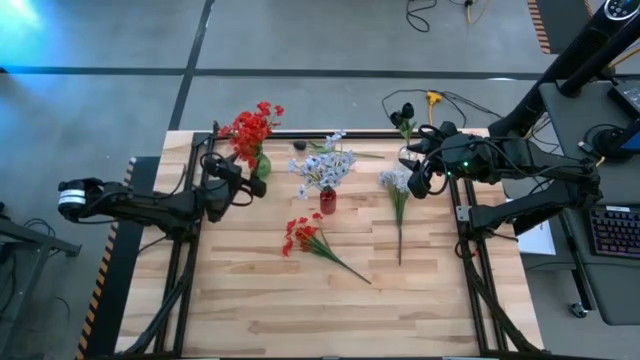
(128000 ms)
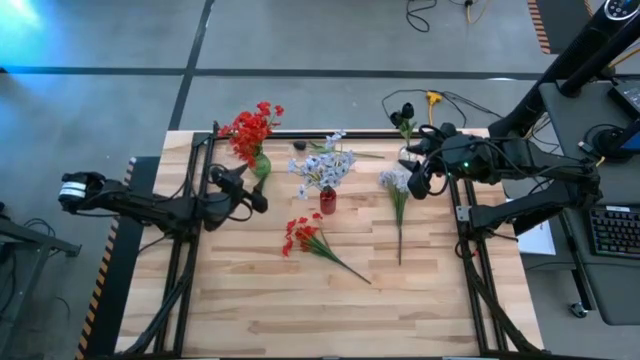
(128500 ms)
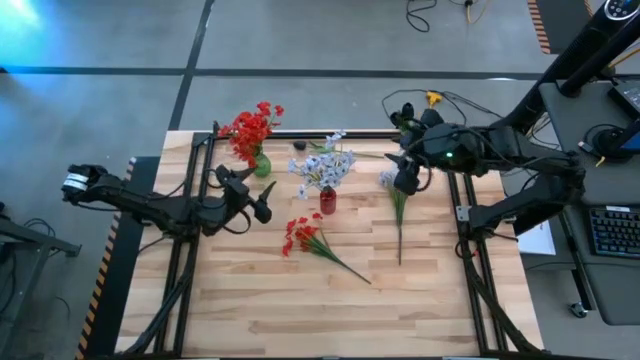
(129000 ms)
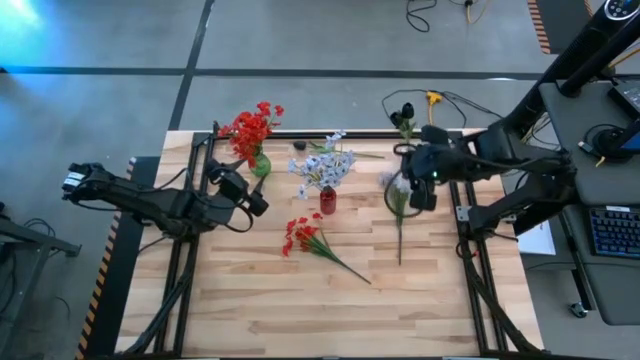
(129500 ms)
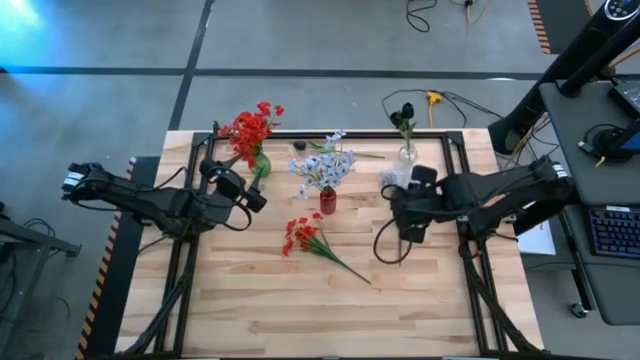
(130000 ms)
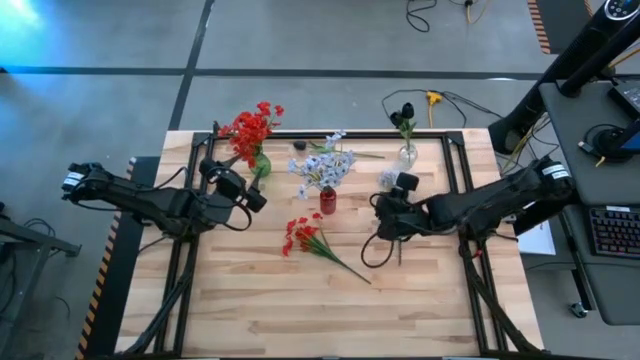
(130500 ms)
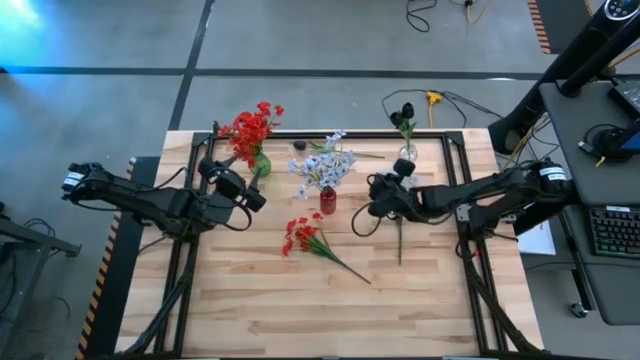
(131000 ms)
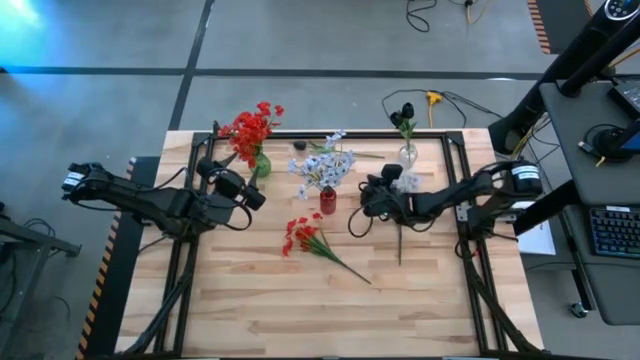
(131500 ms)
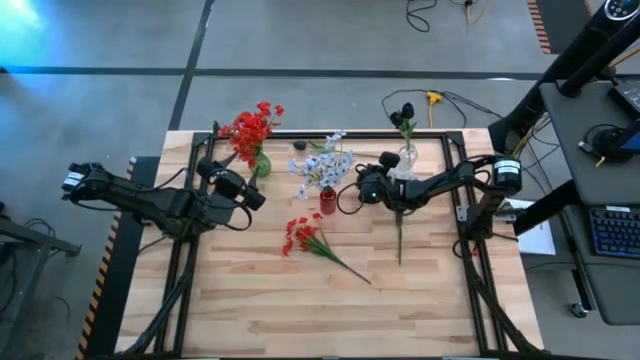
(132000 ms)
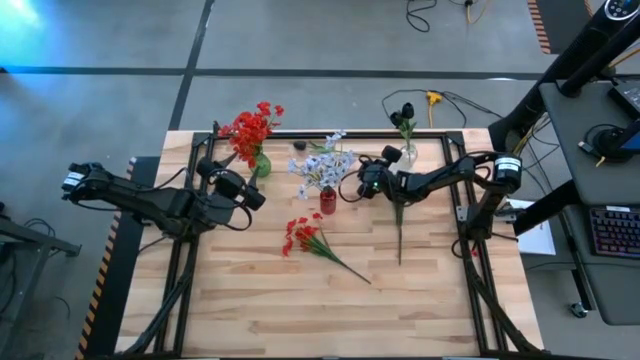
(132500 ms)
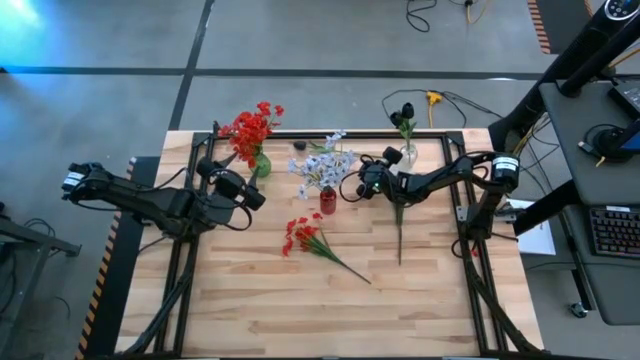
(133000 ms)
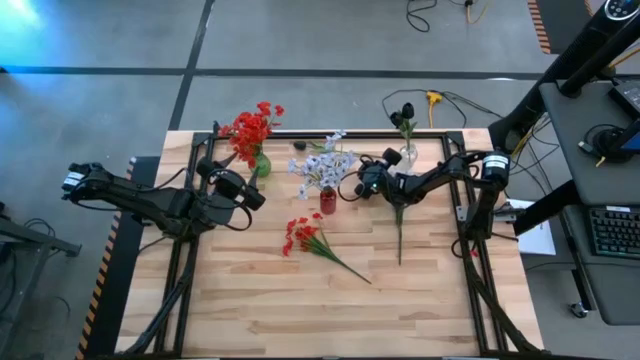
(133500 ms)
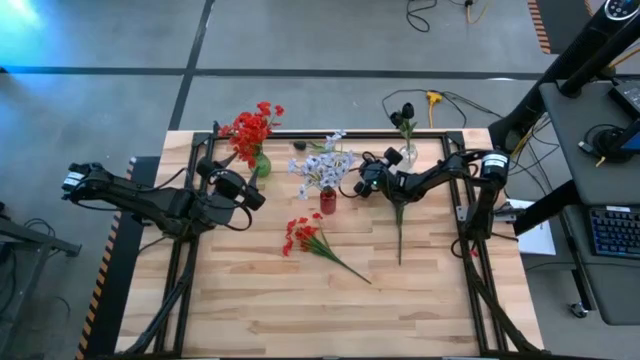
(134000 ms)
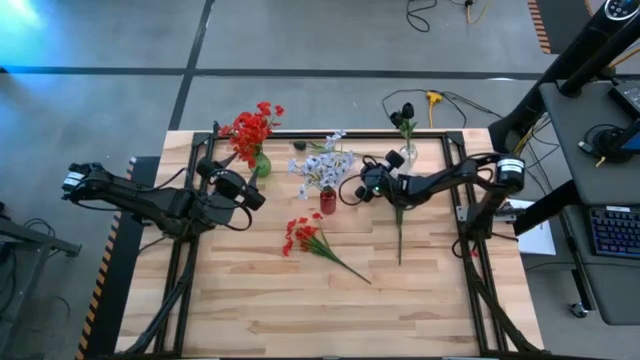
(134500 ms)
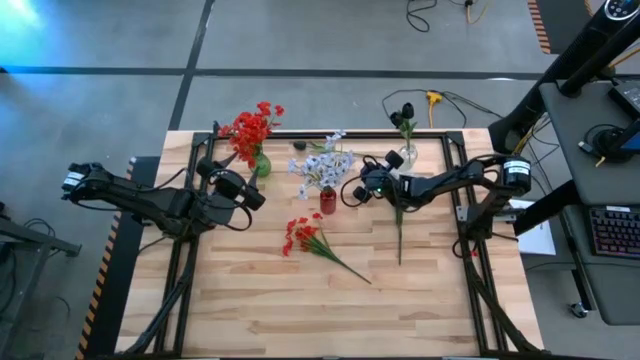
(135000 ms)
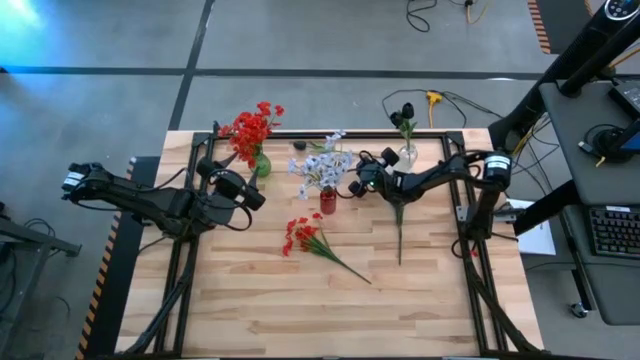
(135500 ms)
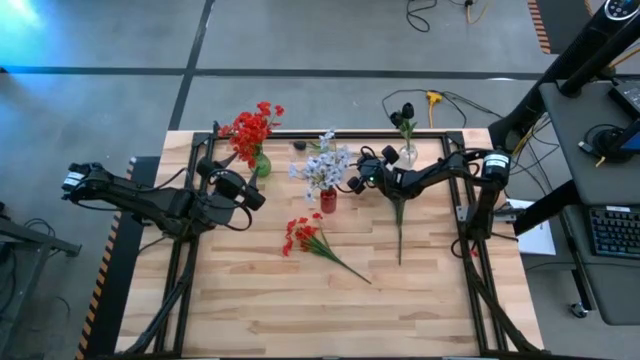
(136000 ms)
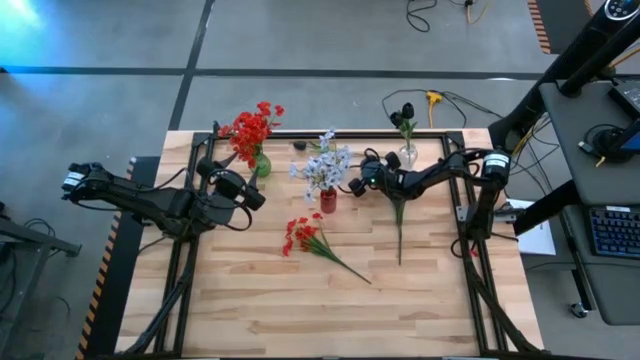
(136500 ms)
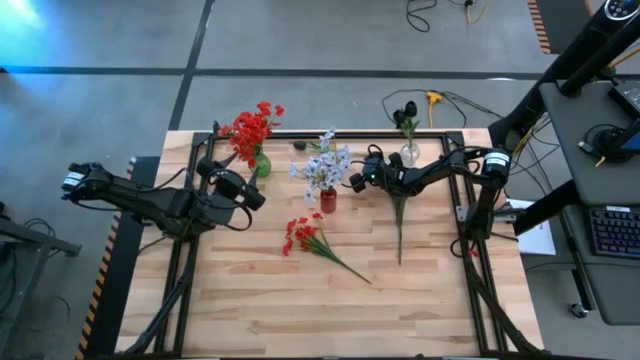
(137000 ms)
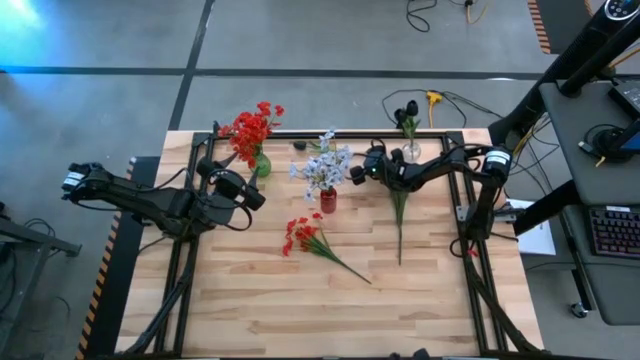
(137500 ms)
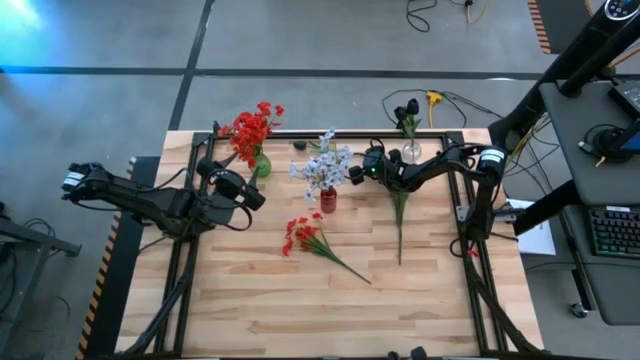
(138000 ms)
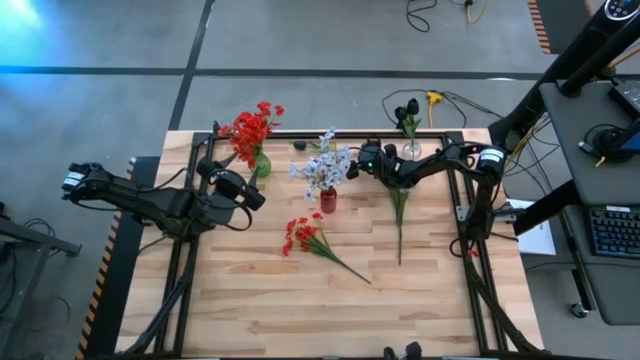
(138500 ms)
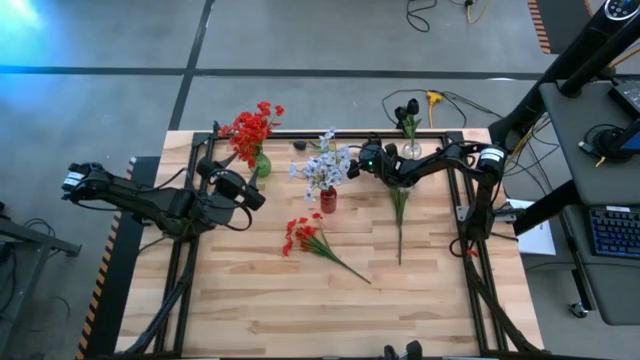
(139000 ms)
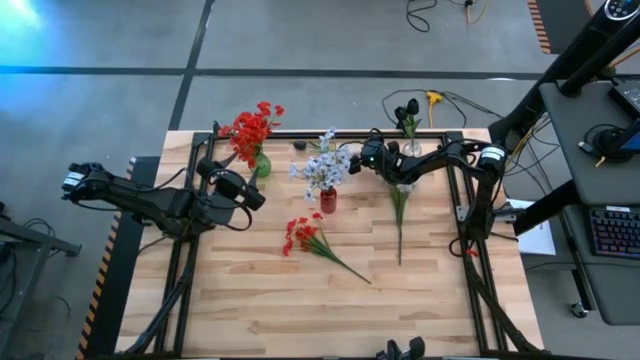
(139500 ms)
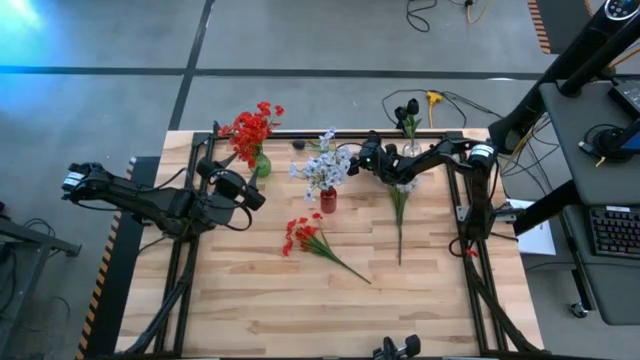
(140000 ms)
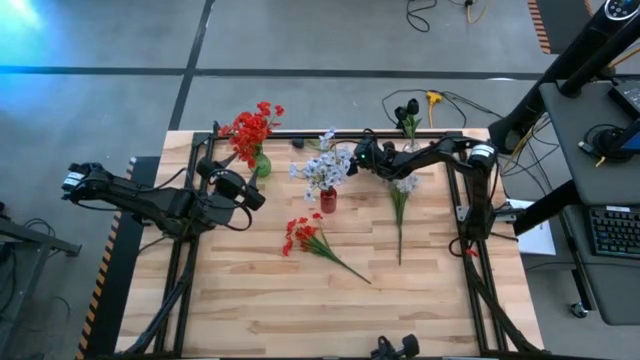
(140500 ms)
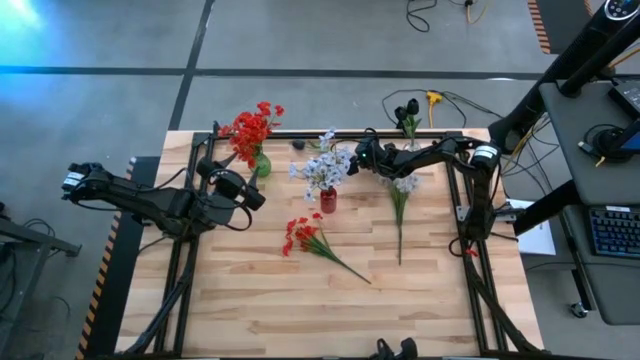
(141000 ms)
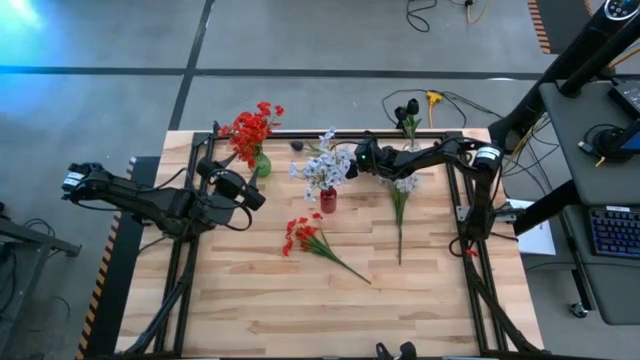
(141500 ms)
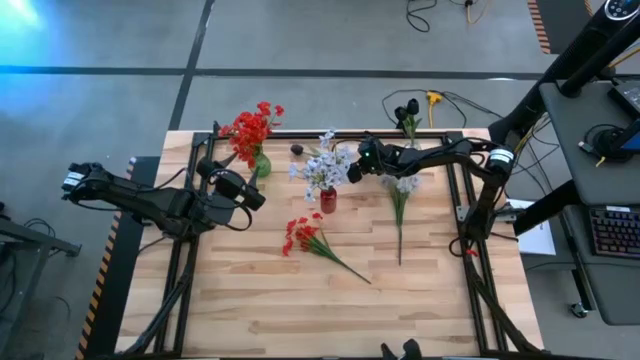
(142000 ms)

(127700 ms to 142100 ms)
Task: Sort flowers into vase by color
Put the black flower into the transparent vase

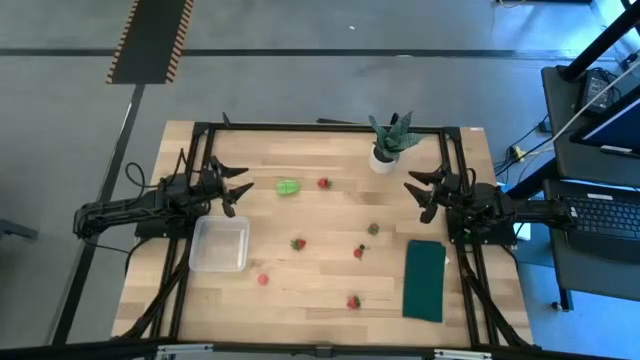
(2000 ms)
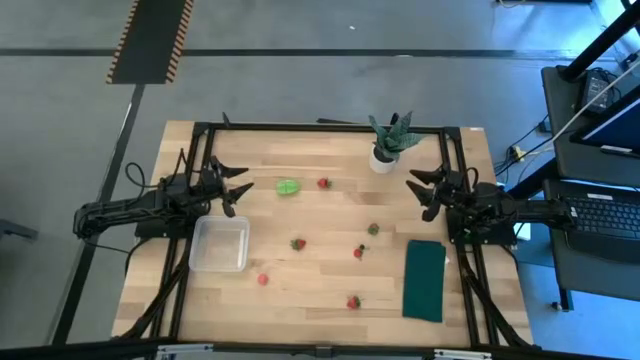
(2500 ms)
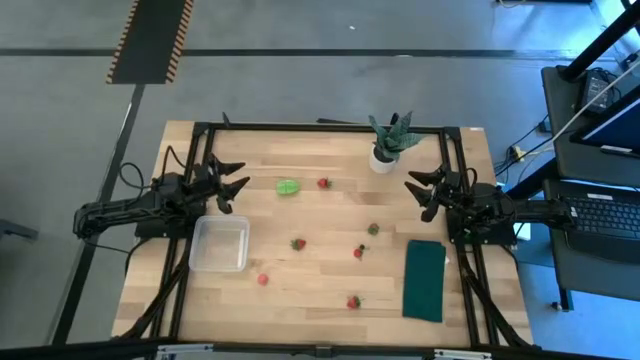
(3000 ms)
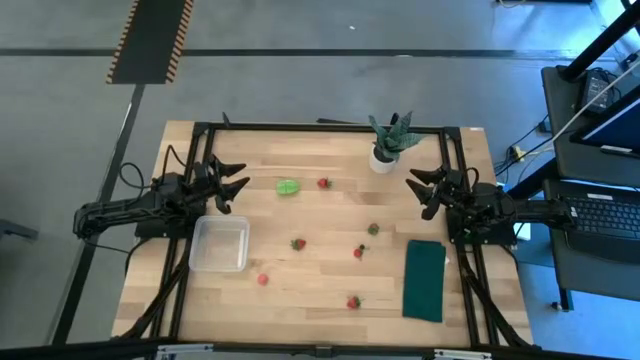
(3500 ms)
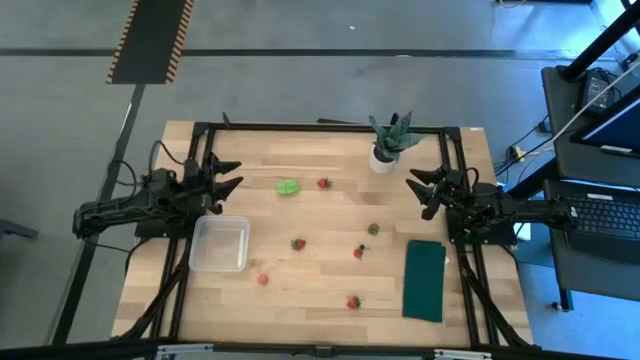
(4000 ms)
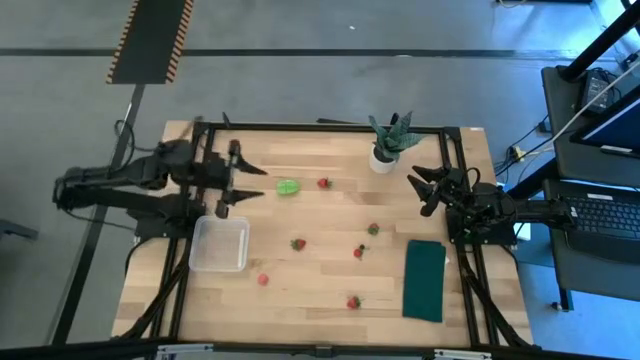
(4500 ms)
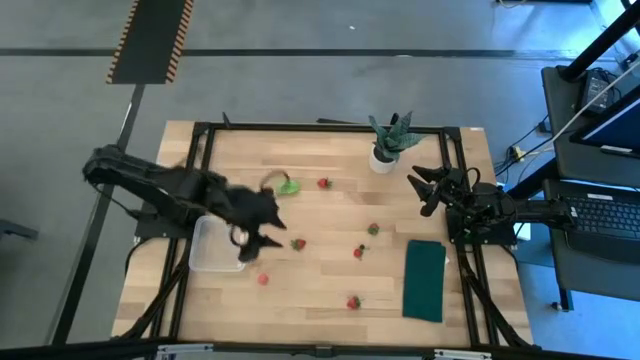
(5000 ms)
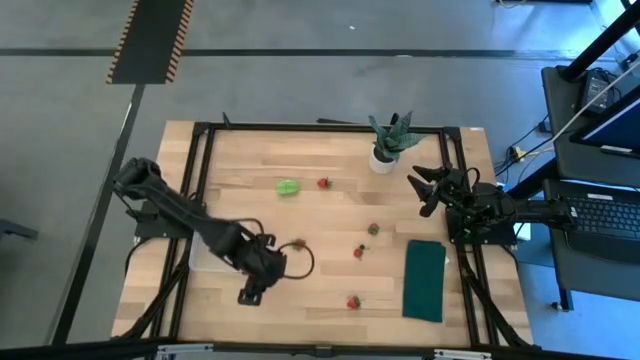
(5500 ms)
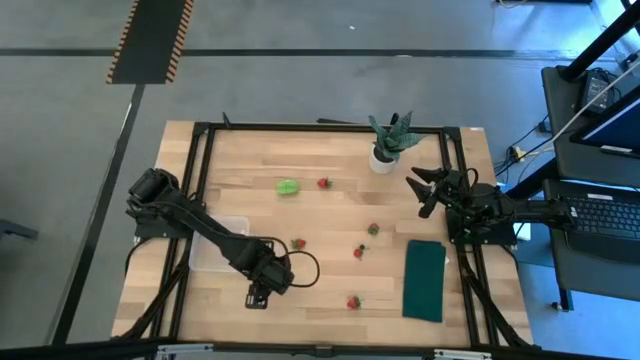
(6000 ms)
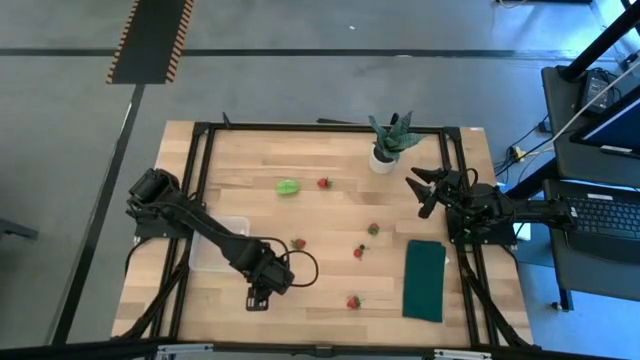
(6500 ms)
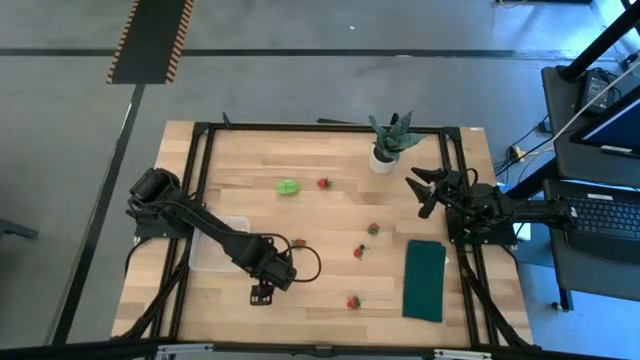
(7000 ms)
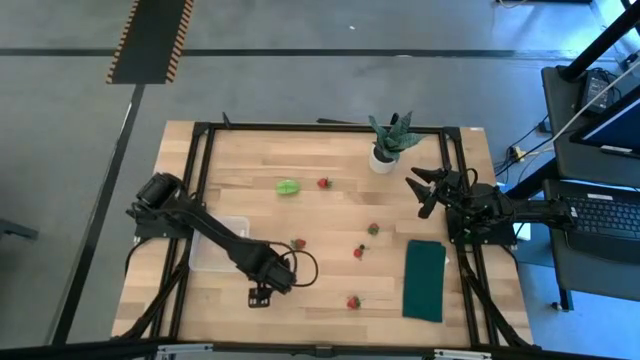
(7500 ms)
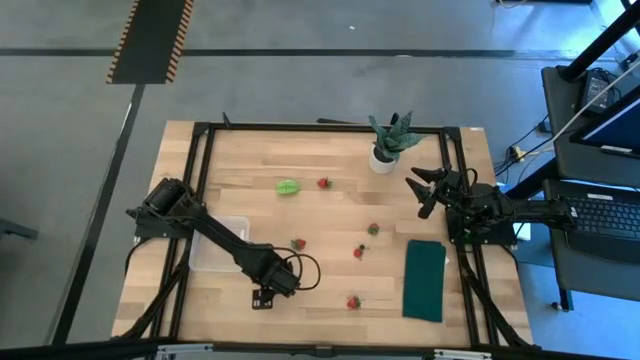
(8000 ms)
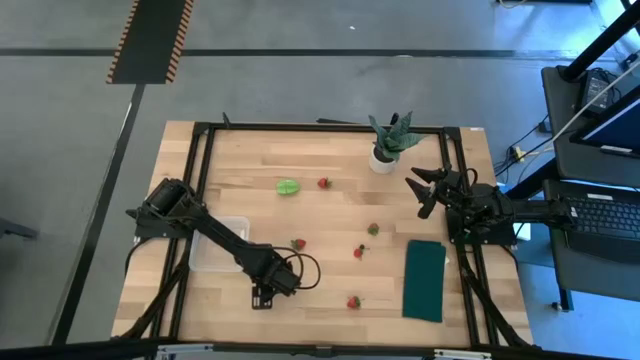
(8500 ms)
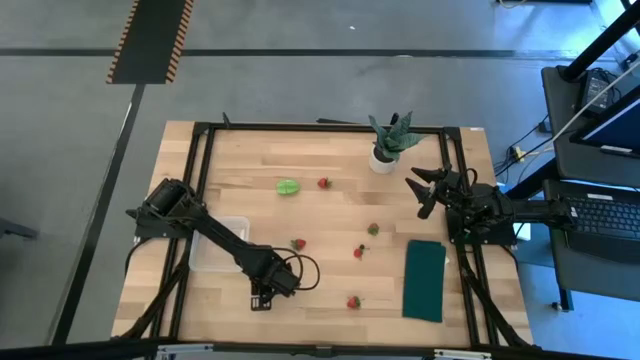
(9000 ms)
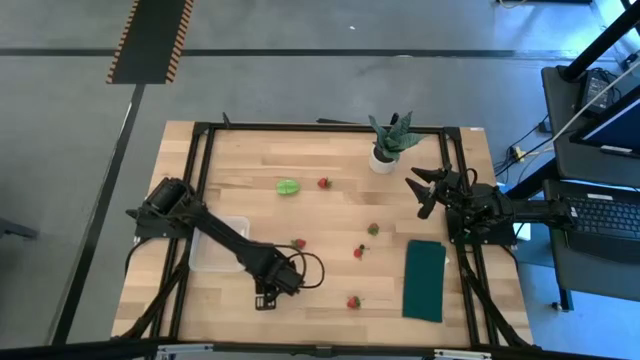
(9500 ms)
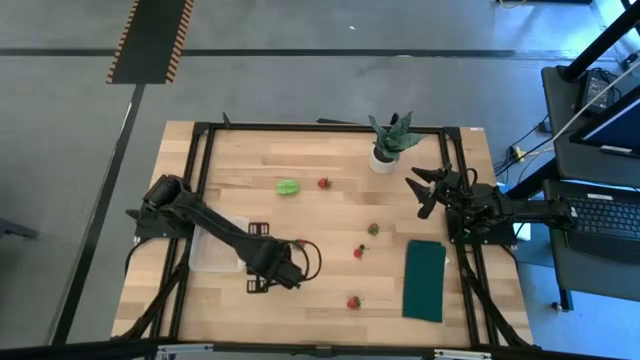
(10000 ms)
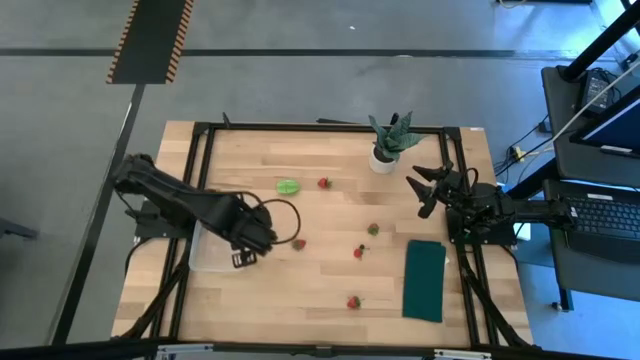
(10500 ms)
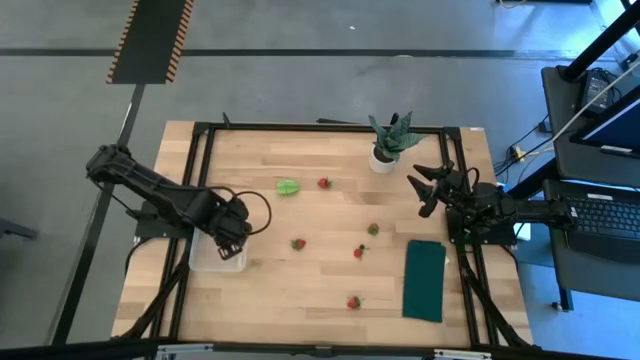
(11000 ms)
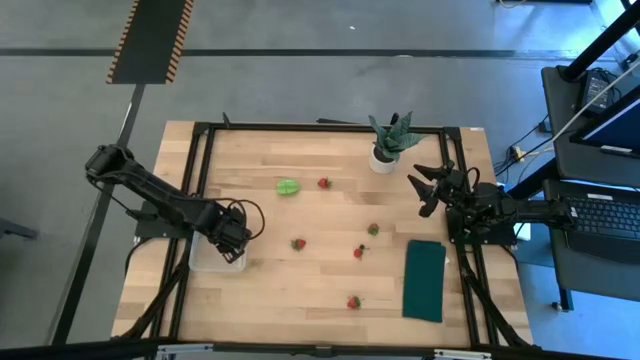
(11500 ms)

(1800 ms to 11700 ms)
Task: Pick and placing Produce into tupperware
Put the pink peach into the transparent bin
